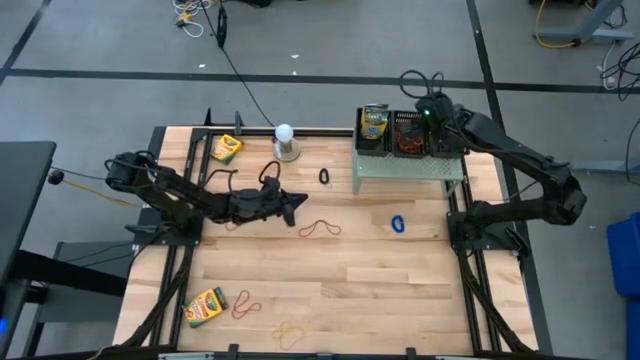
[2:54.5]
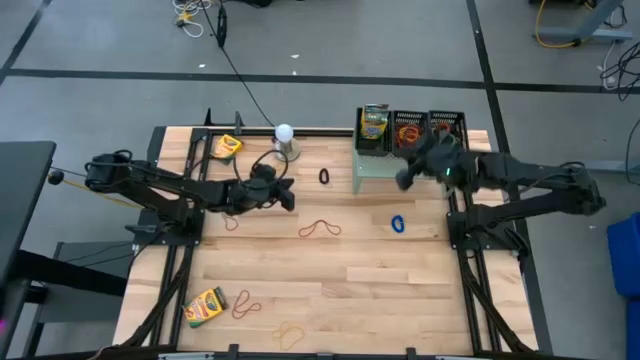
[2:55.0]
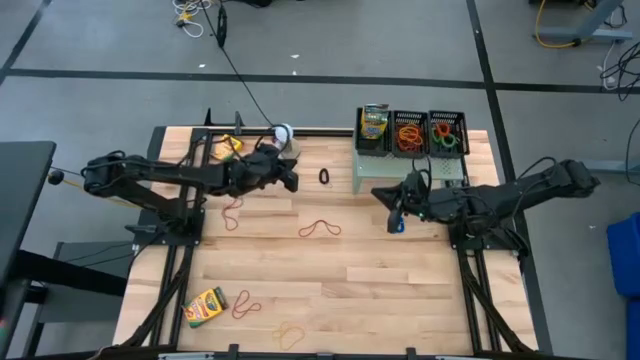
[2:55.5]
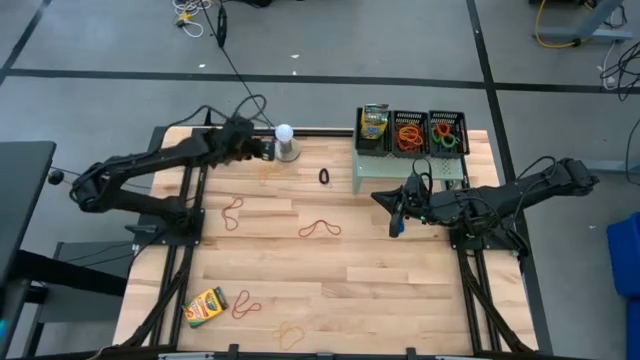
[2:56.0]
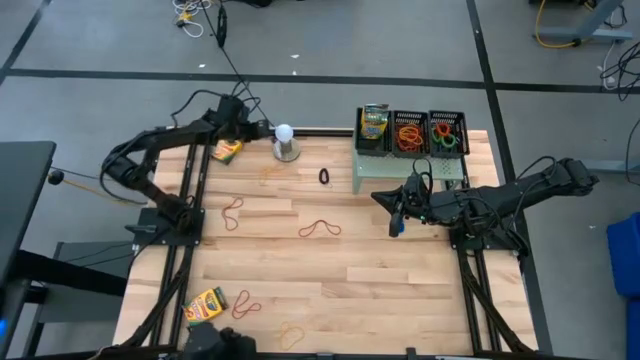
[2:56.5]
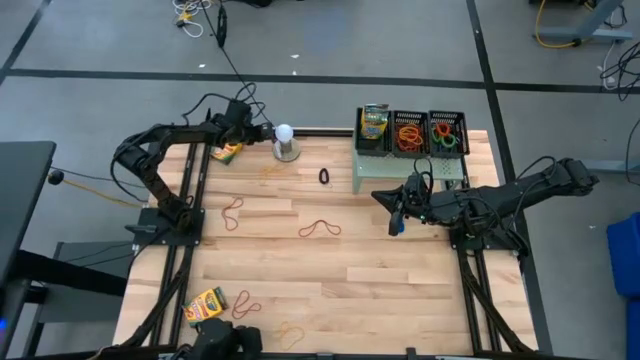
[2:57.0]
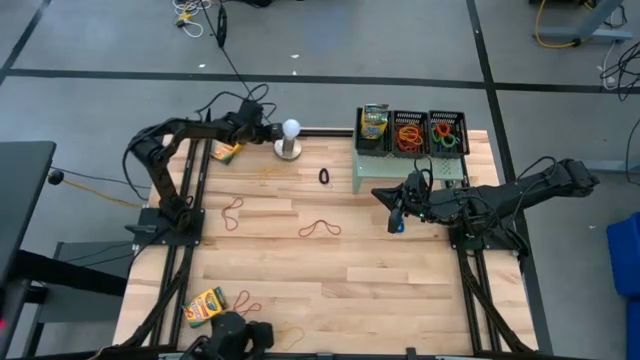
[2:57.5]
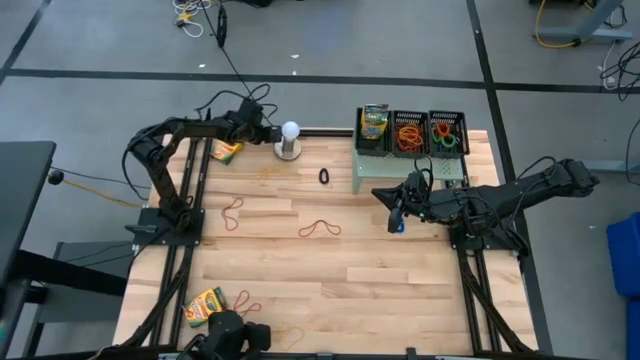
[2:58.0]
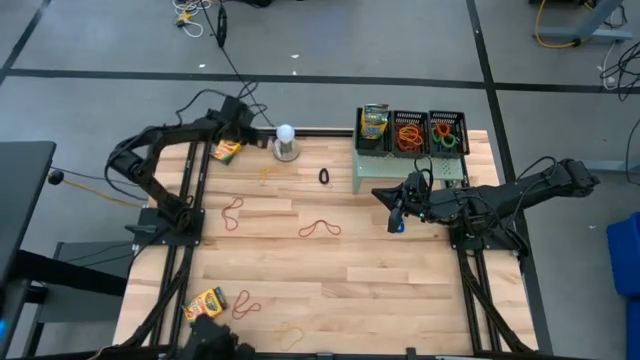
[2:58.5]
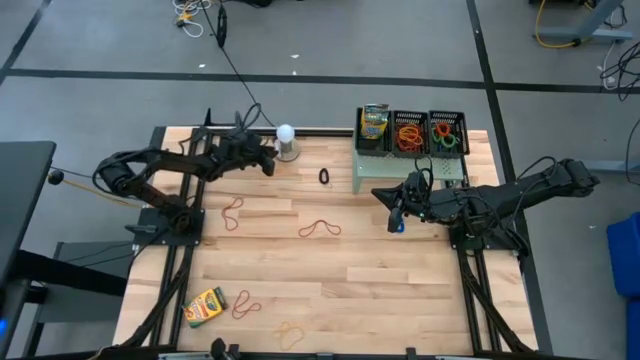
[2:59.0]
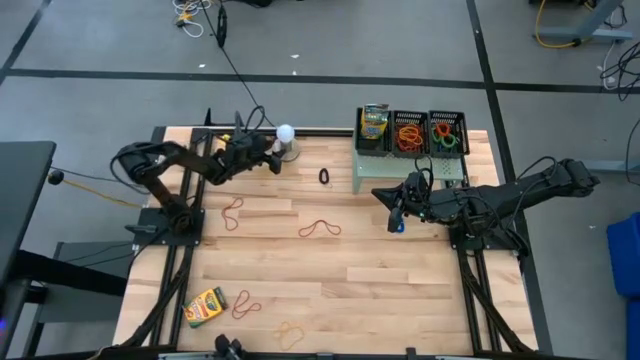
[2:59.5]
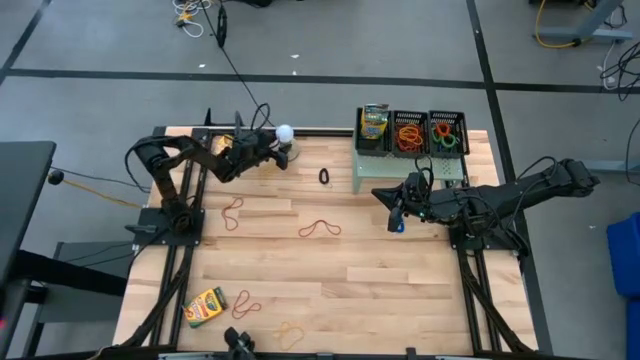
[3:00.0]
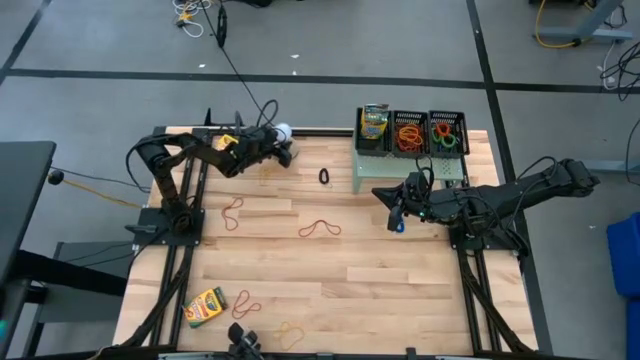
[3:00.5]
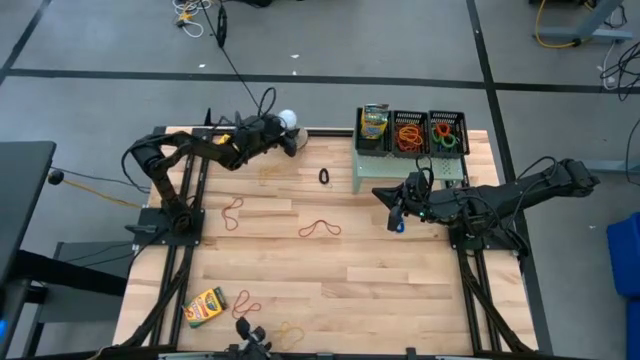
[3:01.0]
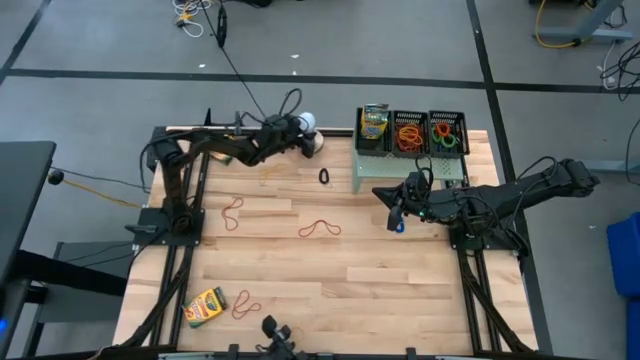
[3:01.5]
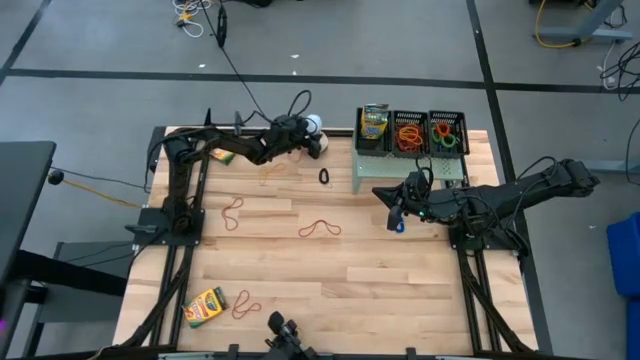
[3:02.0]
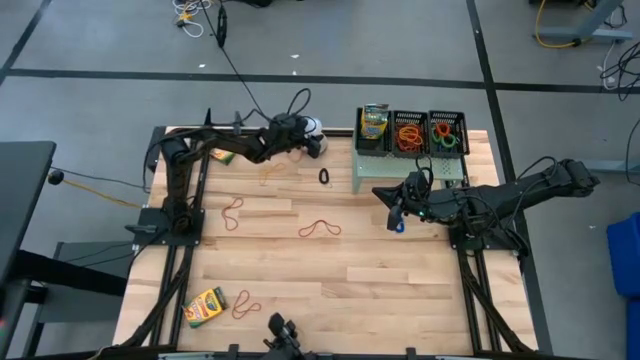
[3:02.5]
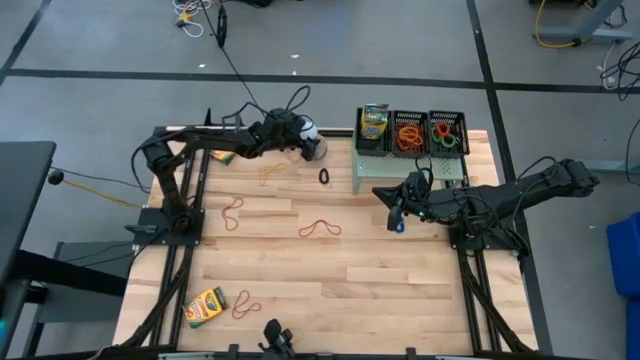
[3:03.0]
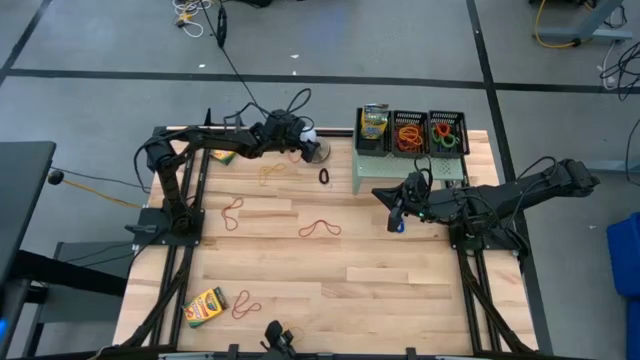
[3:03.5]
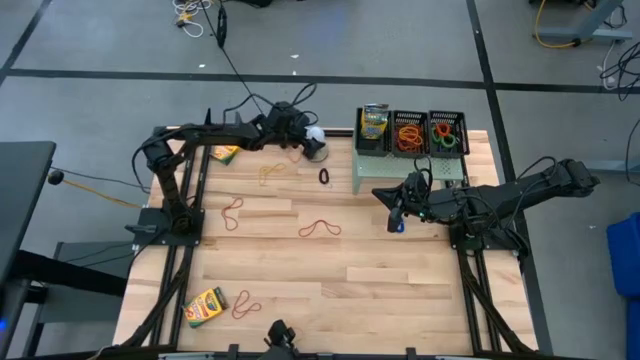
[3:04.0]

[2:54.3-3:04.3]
Task: Pick & Place Office Desk Supplies
Move the lamp to the top center of the table

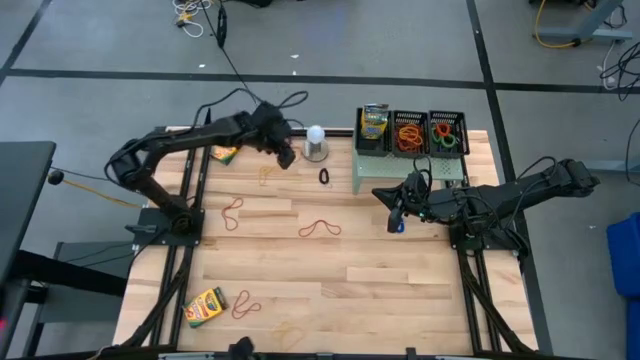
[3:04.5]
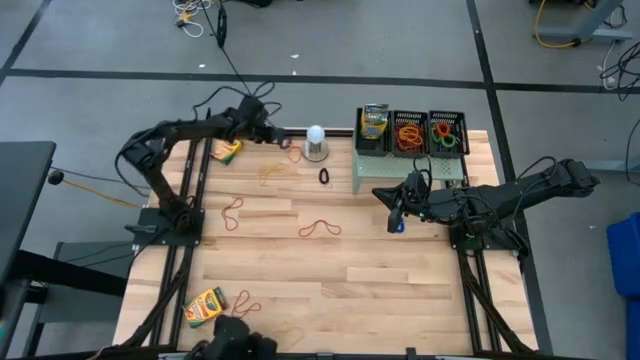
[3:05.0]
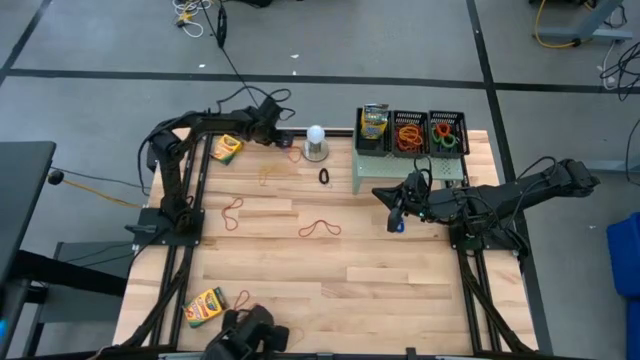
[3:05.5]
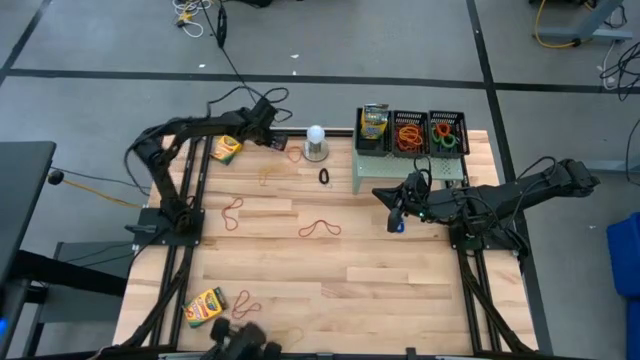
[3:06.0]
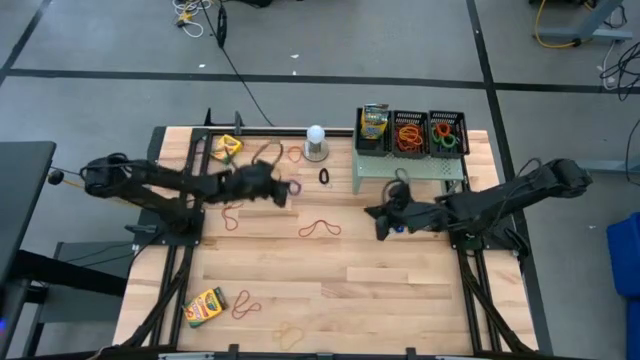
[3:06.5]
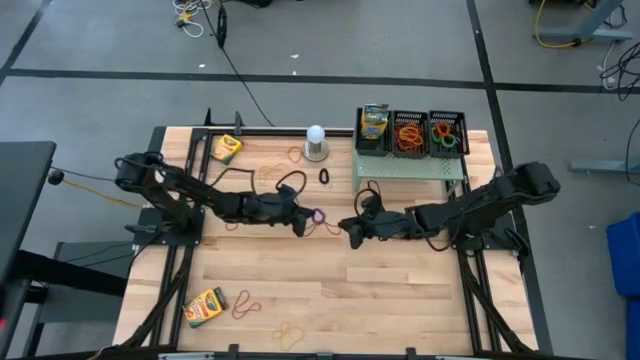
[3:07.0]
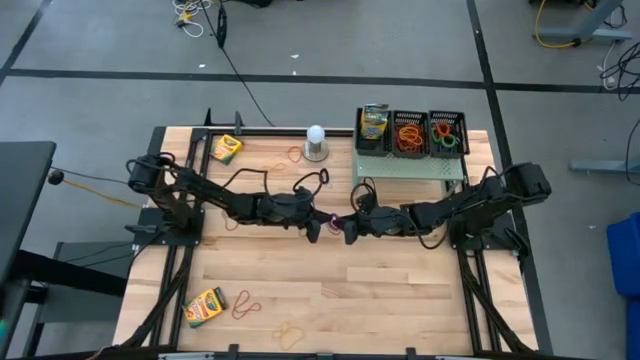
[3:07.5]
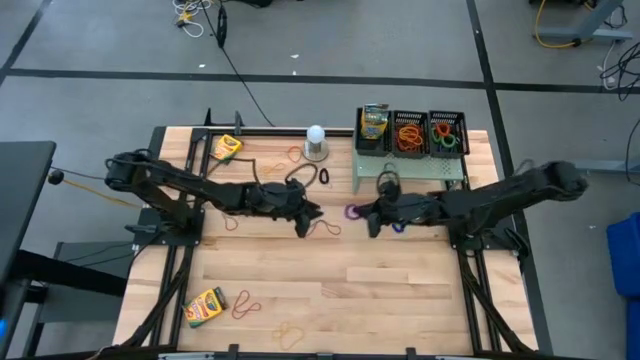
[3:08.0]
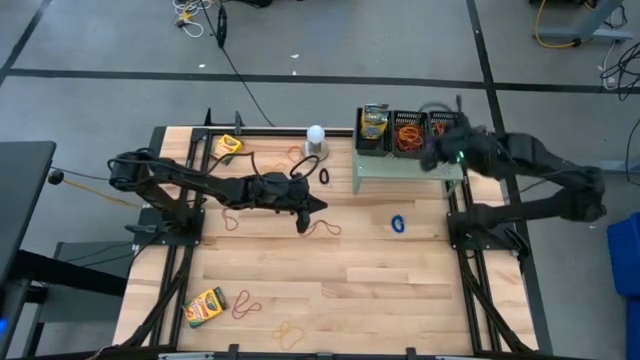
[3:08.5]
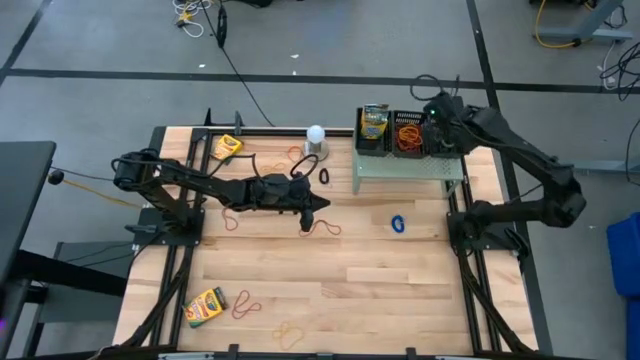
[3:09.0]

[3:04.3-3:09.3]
Put the violet spring keychain into the right basket on the shelf

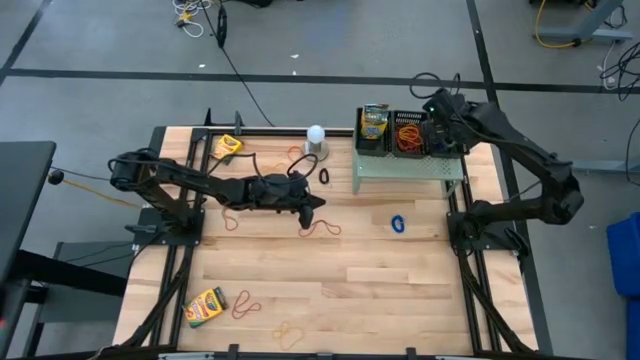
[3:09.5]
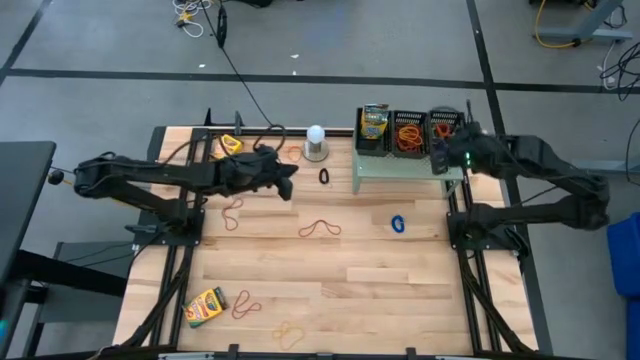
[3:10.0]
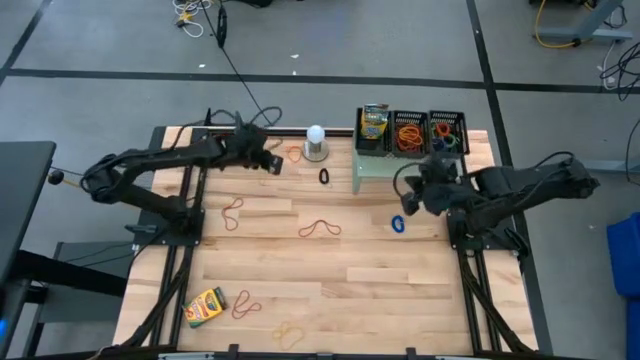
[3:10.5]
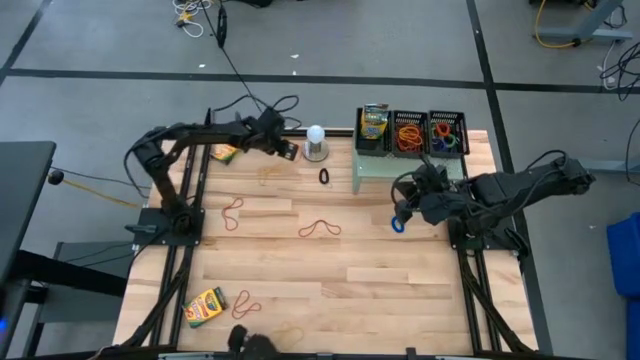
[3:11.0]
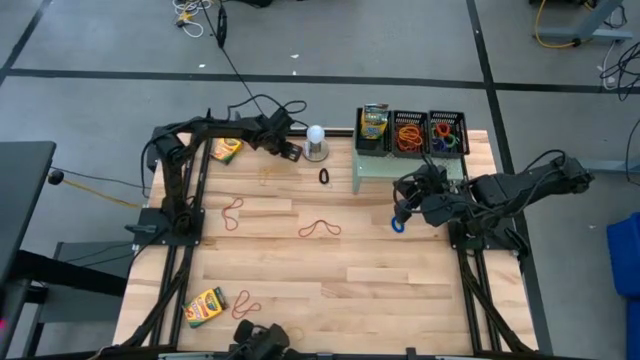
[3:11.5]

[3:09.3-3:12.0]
Put the orange rubber band into the middle basket on the shelf

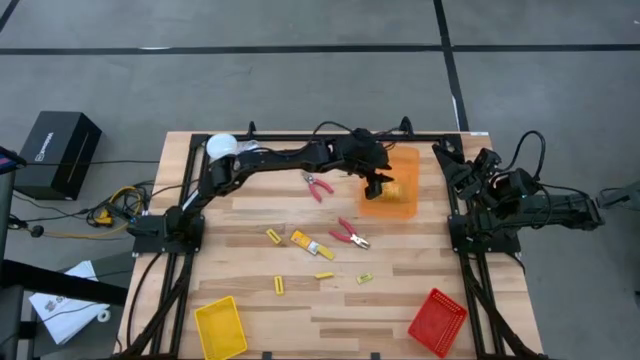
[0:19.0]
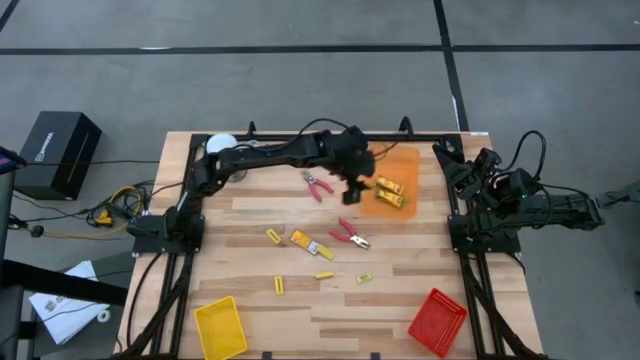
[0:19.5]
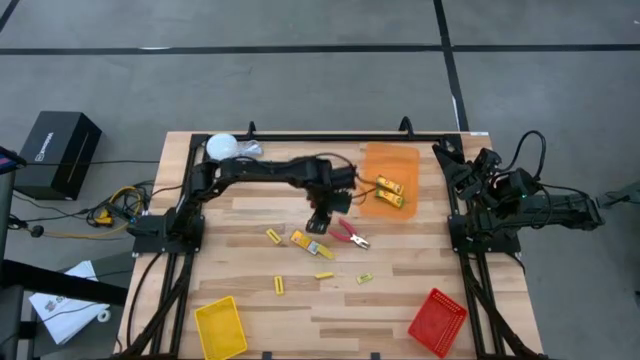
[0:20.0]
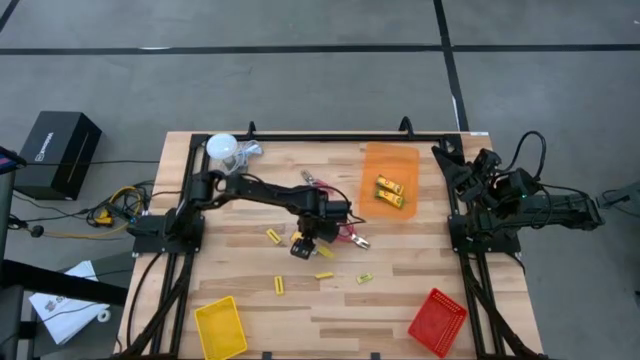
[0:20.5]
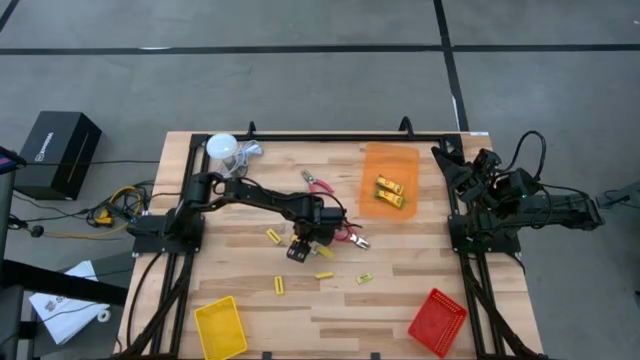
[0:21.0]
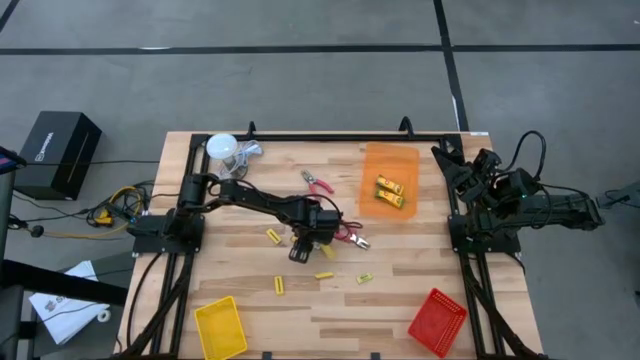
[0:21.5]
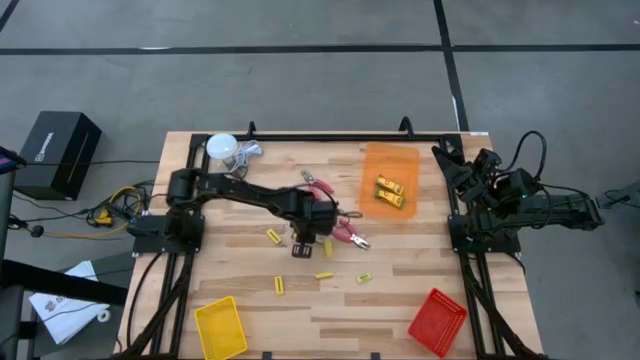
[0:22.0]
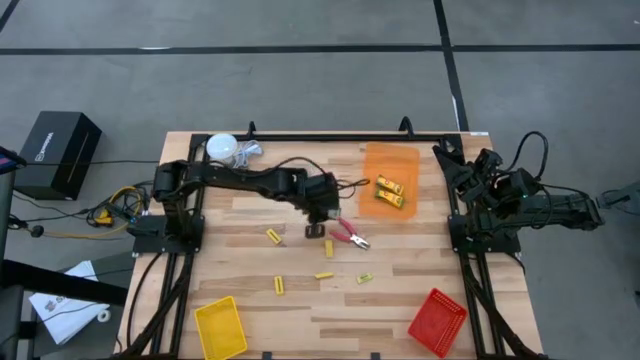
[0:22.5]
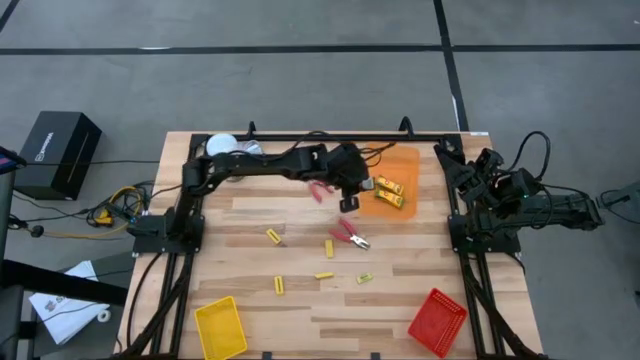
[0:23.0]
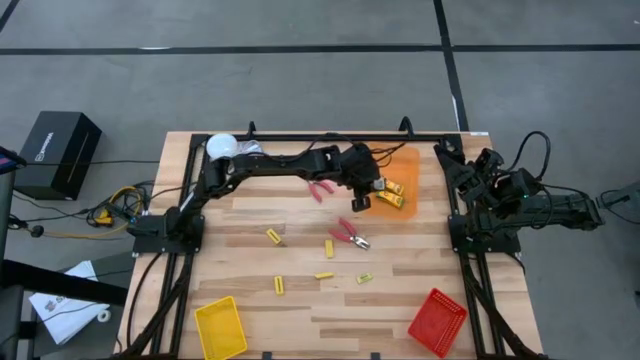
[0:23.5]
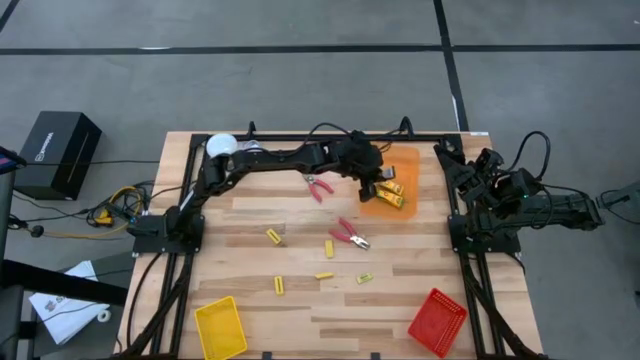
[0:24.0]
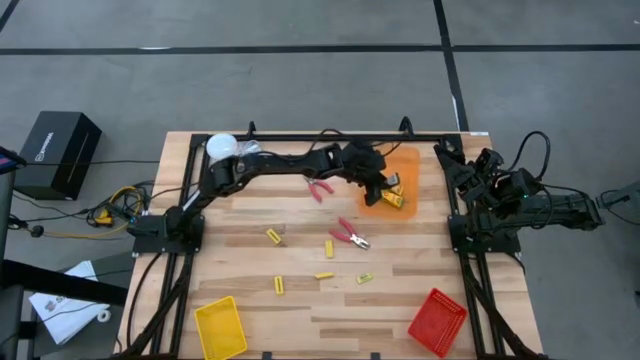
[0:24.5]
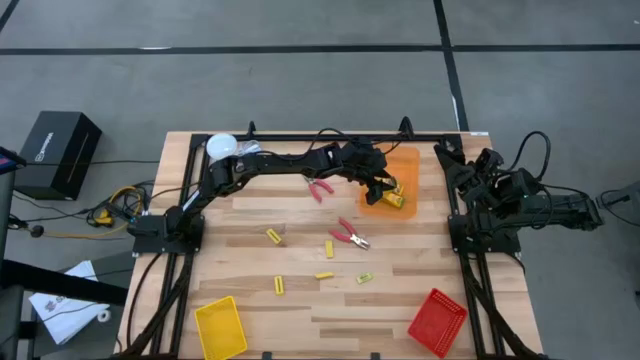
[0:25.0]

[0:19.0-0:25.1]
Task: Pick & Place School Supplies
Put the yellow crayon bag into the orange bin
